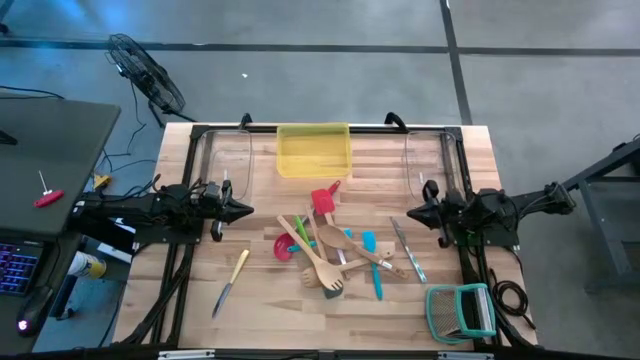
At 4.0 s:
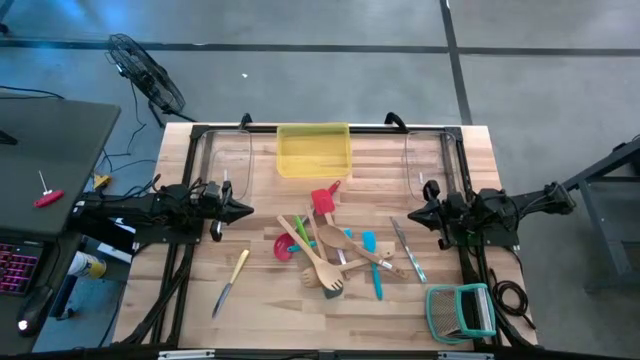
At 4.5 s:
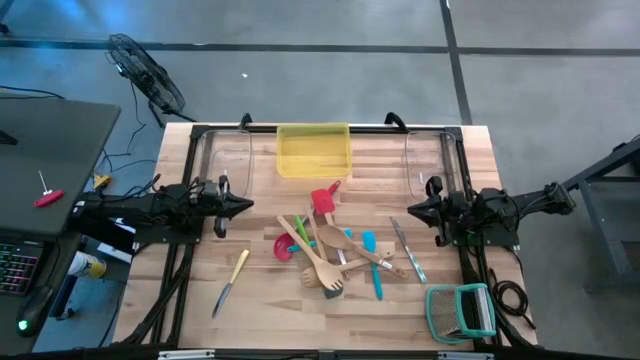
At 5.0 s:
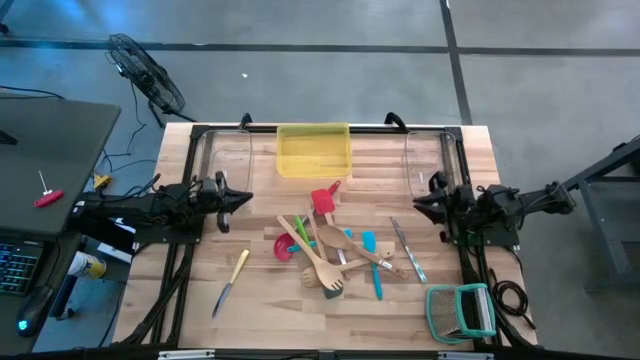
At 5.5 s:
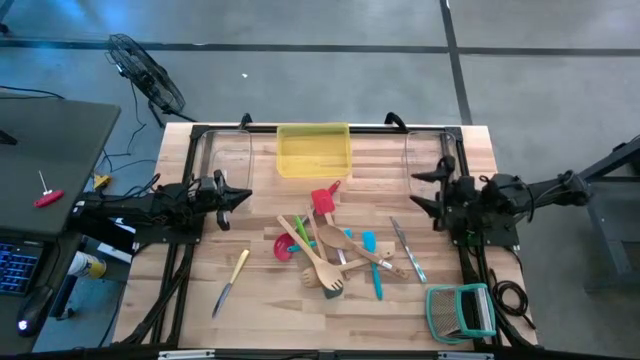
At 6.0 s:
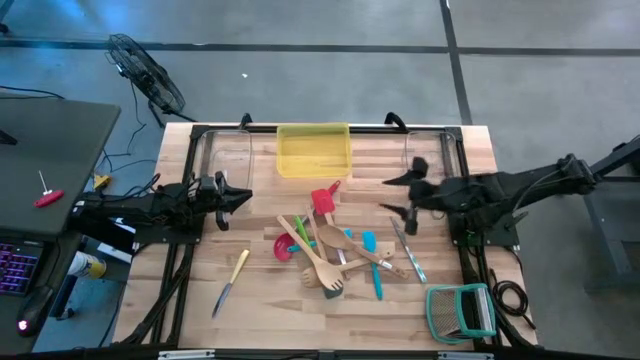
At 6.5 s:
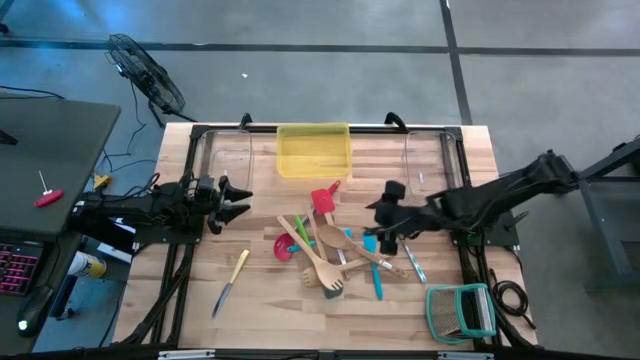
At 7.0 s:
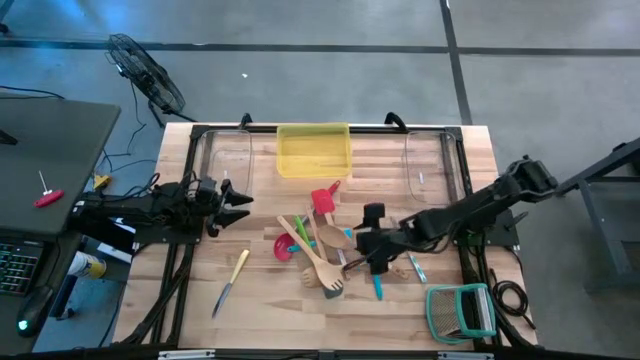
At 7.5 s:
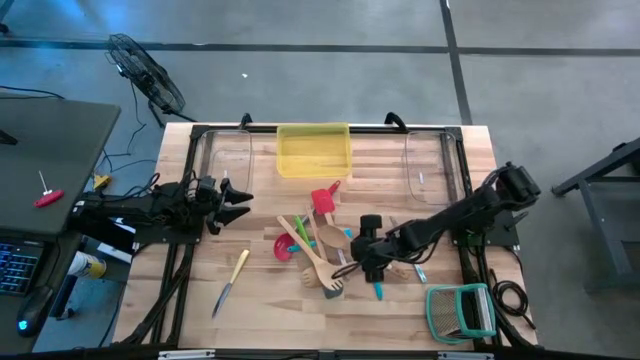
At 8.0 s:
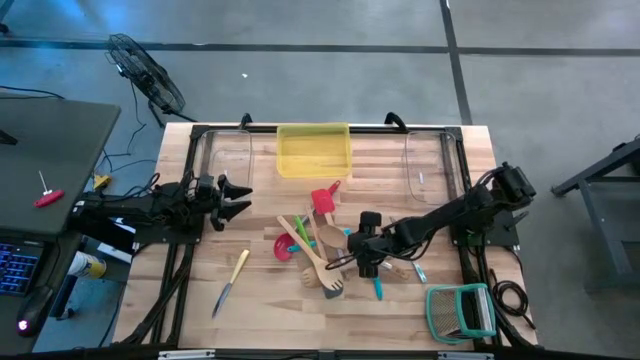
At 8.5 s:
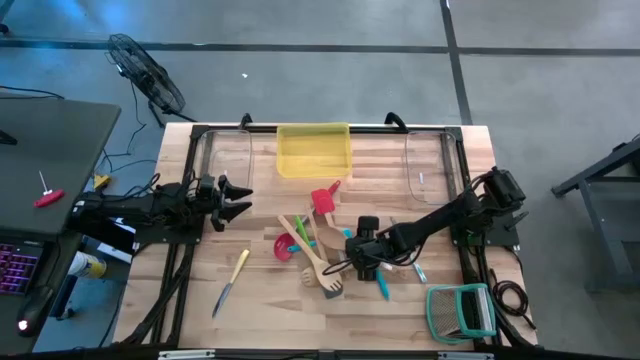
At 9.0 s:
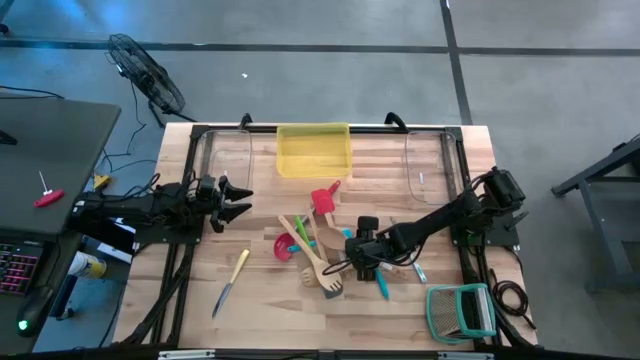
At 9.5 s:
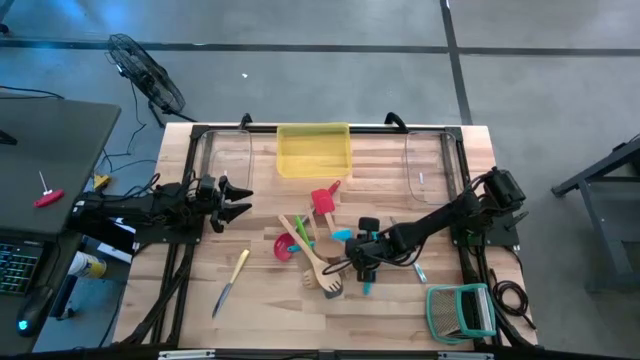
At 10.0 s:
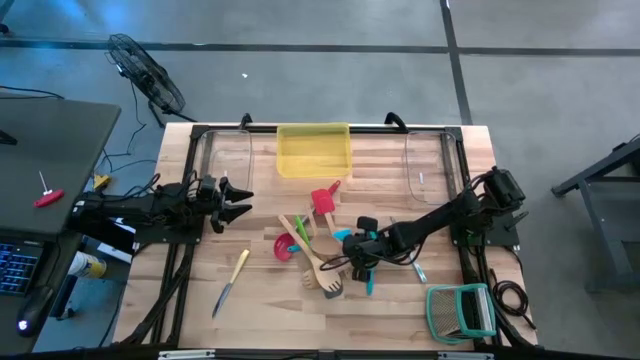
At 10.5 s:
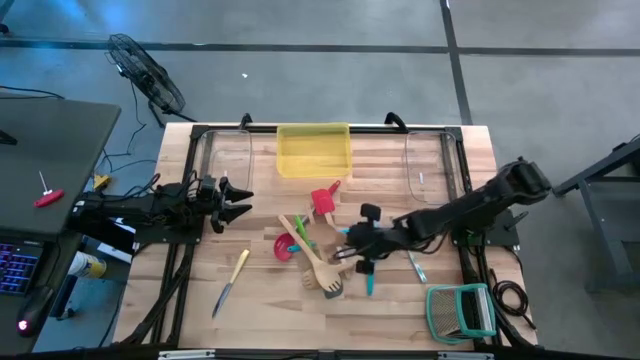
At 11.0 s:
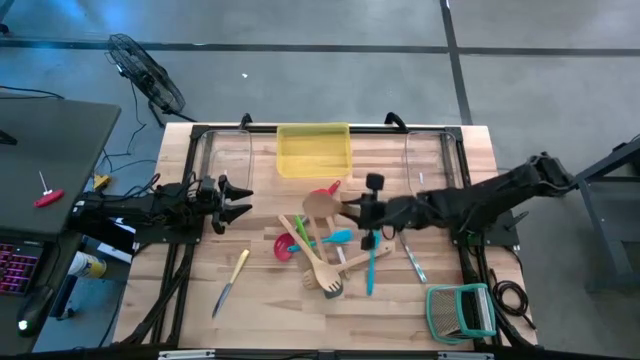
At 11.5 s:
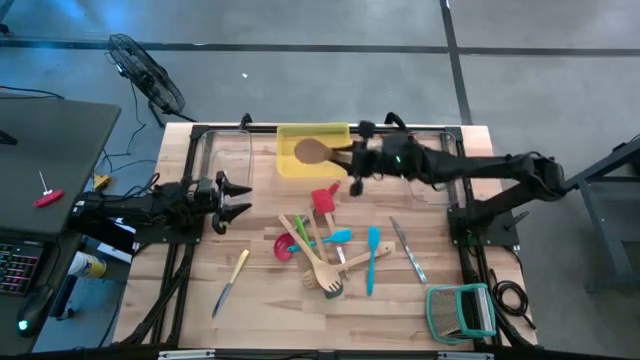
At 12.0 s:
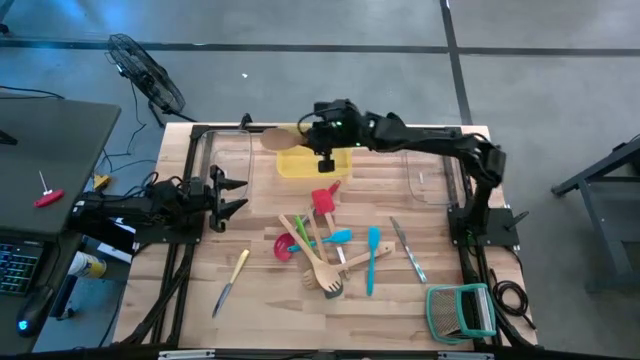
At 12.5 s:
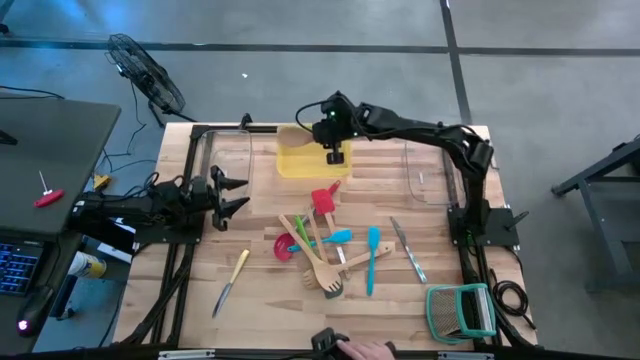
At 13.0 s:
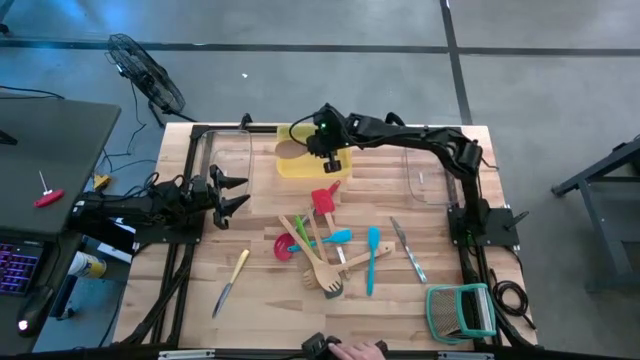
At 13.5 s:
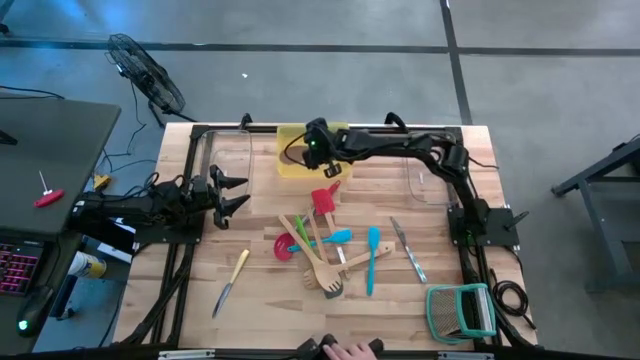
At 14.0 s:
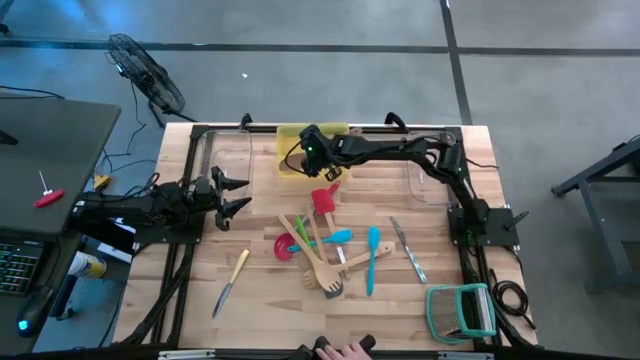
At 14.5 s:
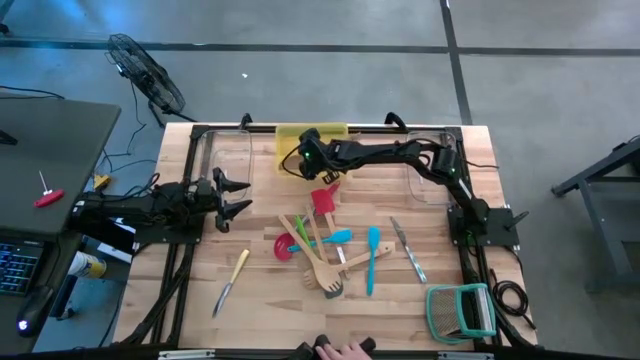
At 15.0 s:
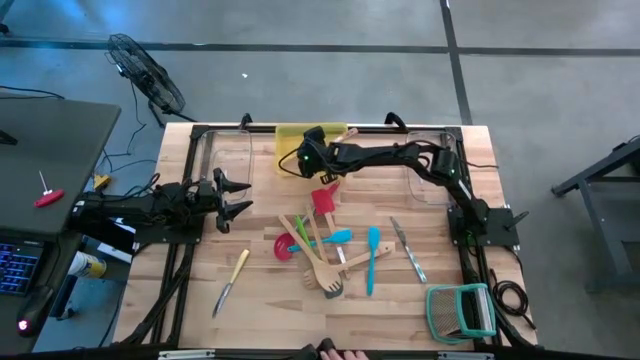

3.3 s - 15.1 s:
Task: Pick & Place Kitchen Items
Put the brown serving spoon into the yellow bin

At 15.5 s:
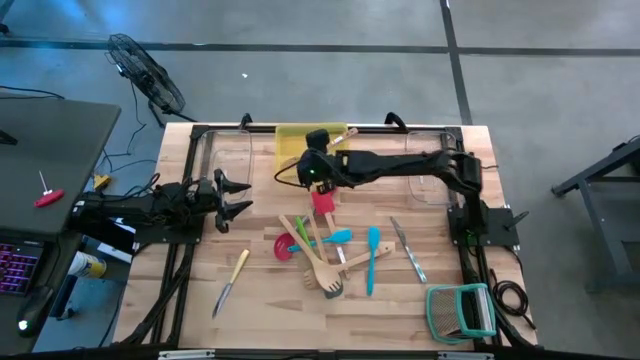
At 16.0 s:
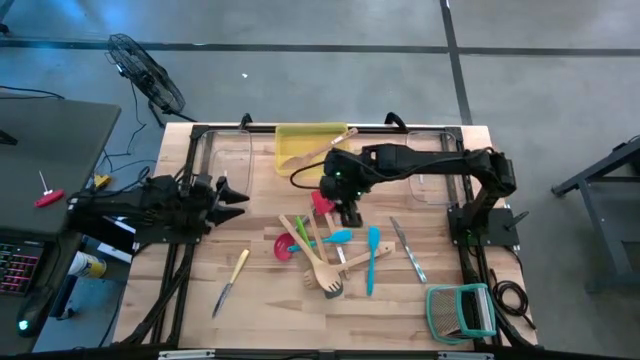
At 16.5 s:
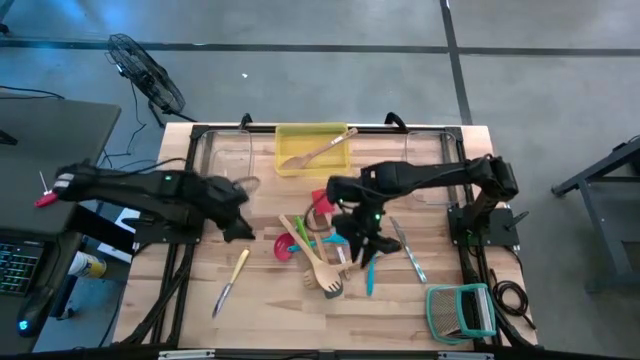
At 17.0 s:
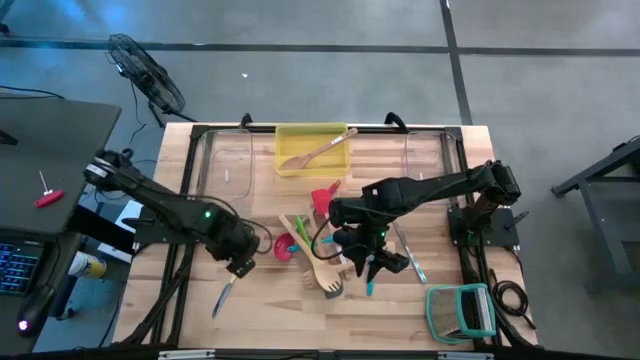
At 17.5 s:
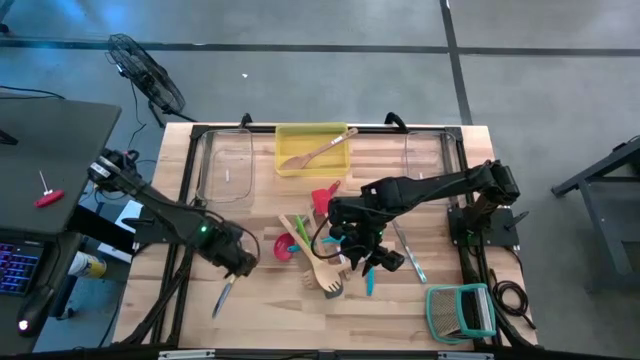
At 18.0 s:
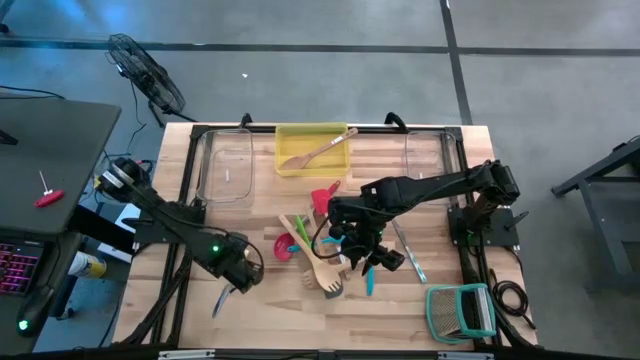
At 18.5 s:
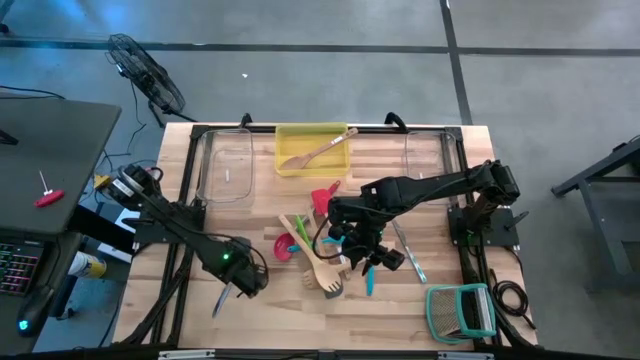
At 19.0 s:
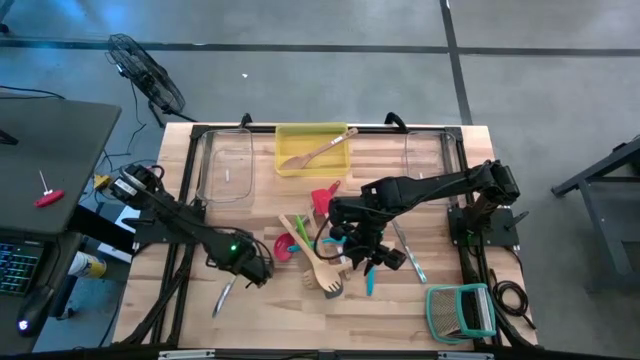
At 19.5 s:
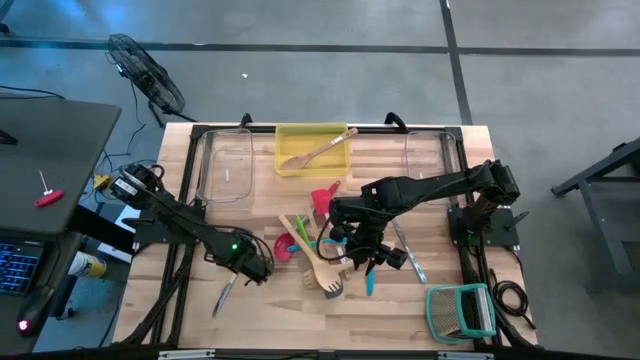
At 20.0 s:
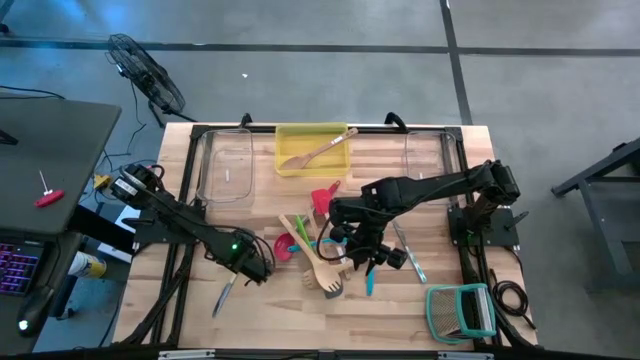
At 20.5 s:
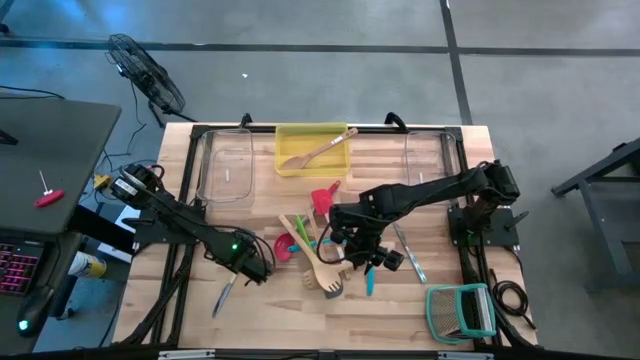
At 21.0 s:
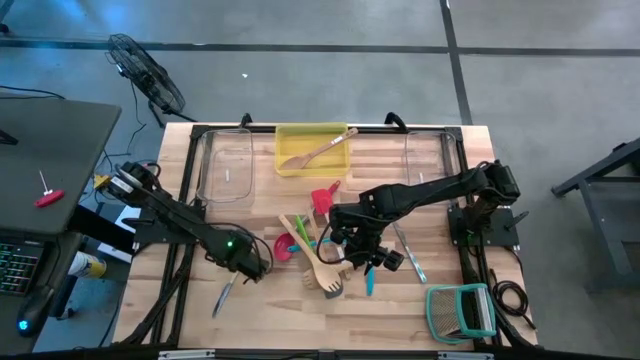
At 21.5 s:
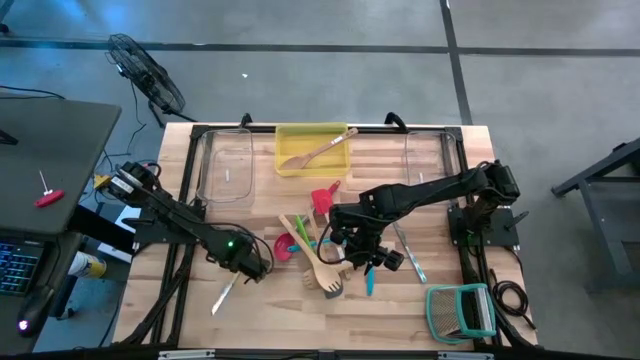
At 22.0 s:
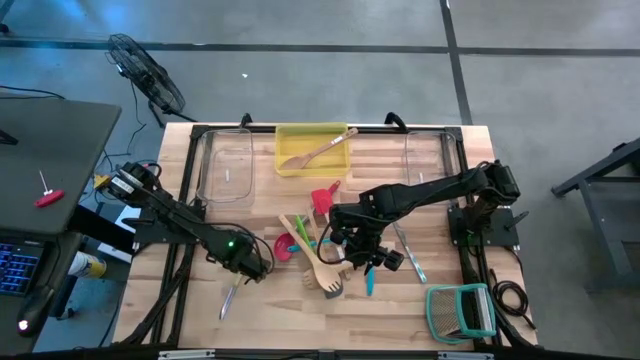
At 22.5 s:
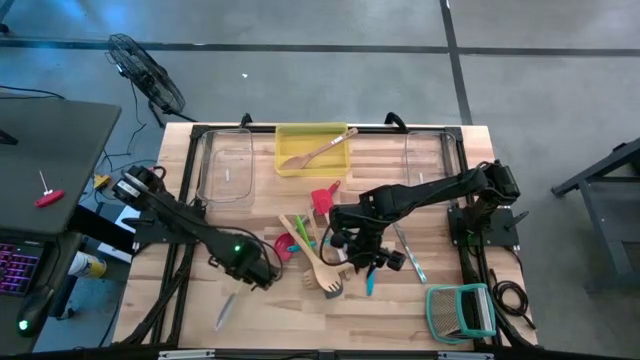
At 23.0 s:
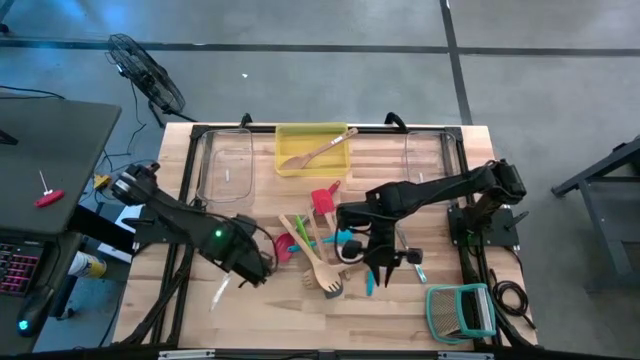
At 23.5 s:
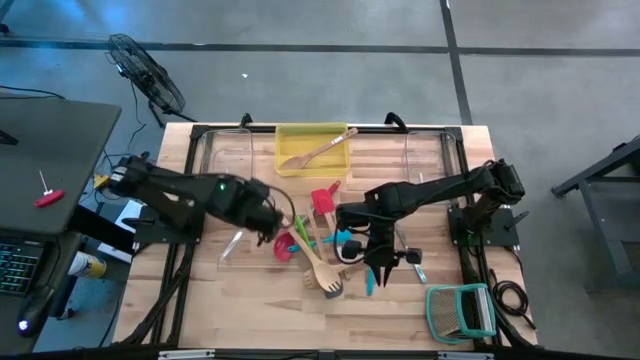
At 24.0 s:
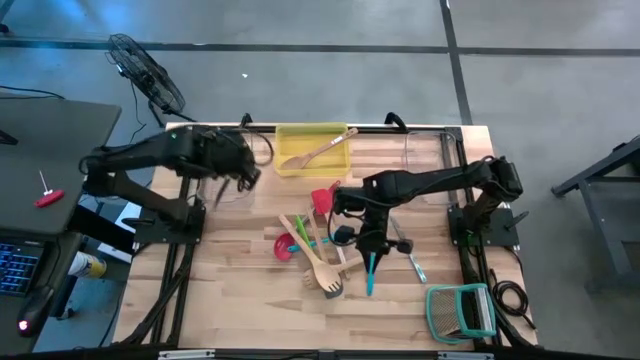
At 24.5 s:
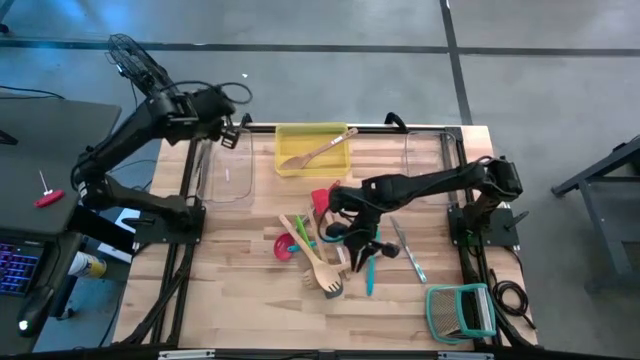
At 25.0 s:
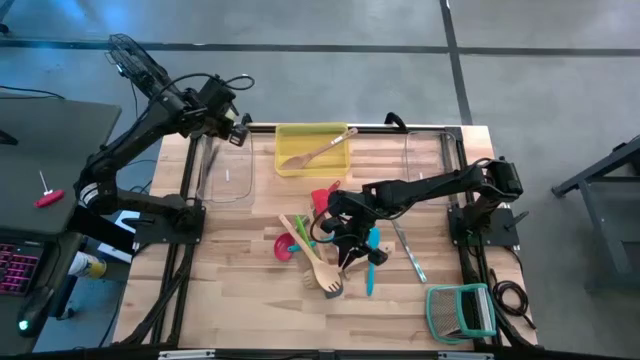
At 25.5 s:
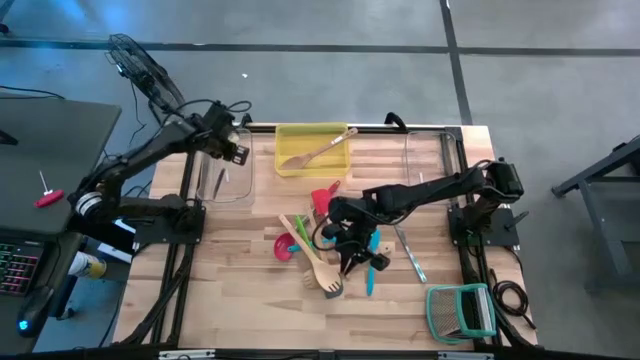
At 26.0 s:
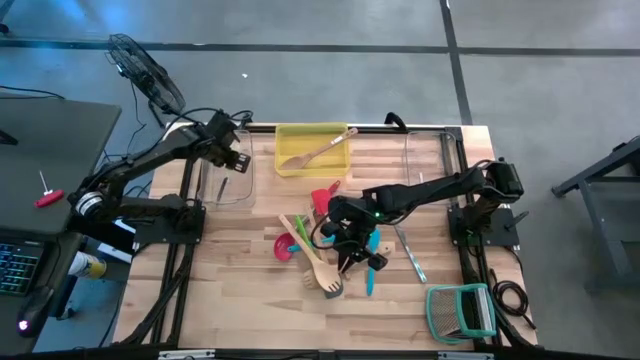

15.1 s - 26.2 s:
Put the yellow knife into the left transparent bin
